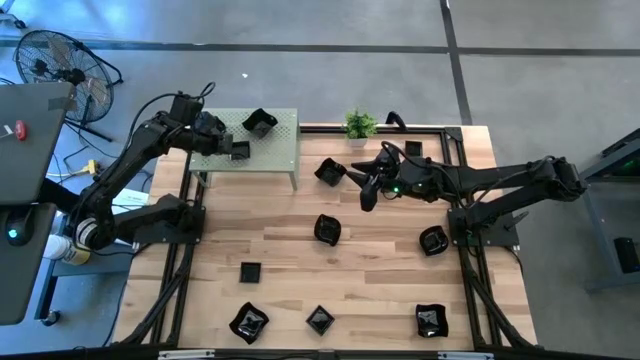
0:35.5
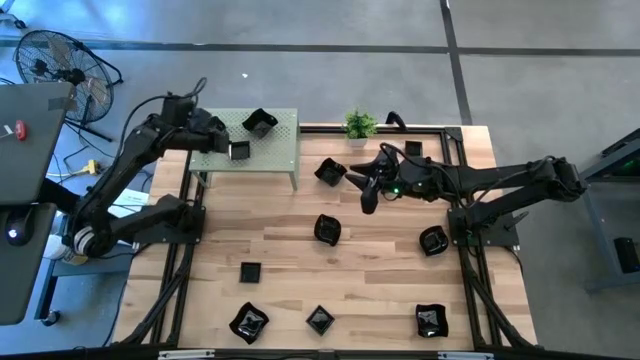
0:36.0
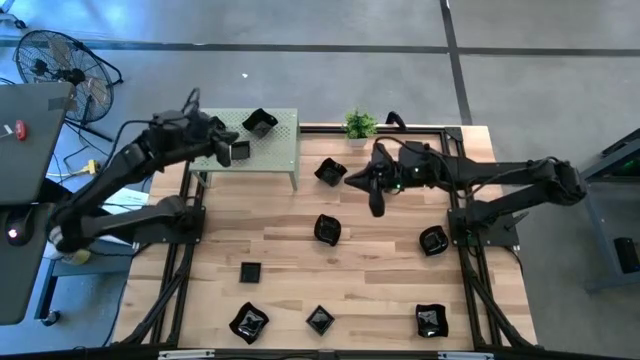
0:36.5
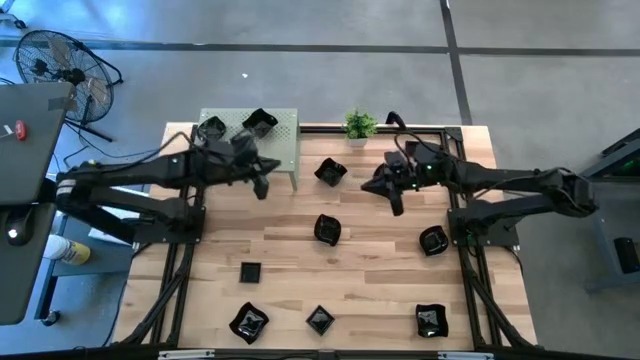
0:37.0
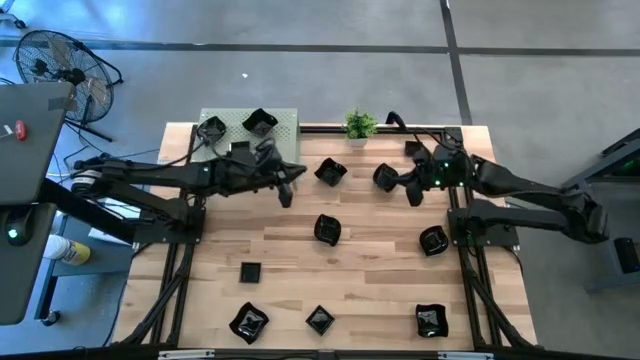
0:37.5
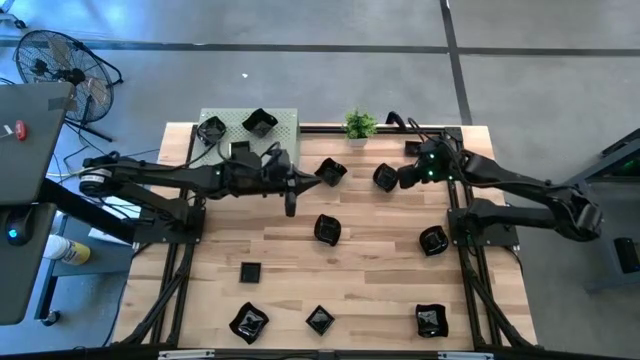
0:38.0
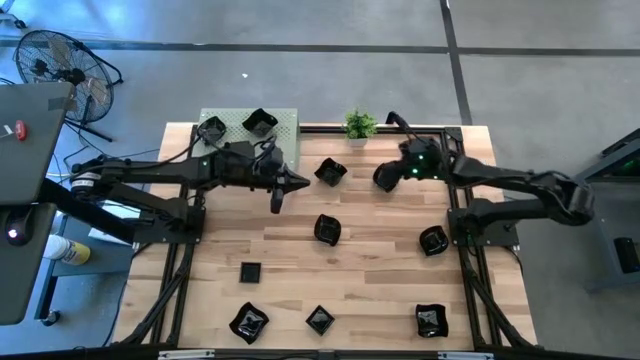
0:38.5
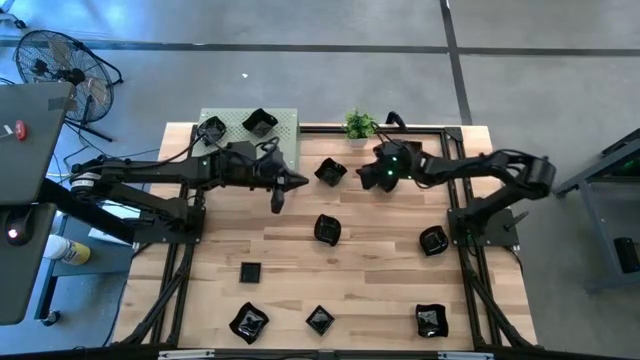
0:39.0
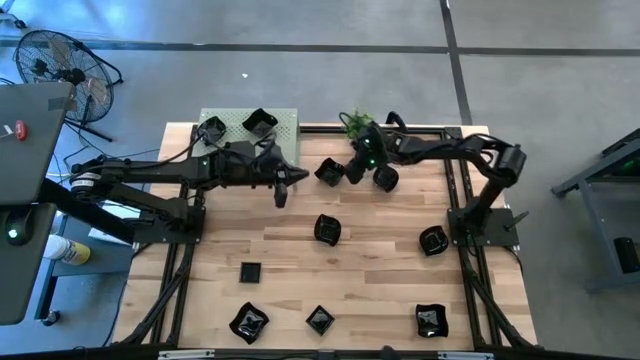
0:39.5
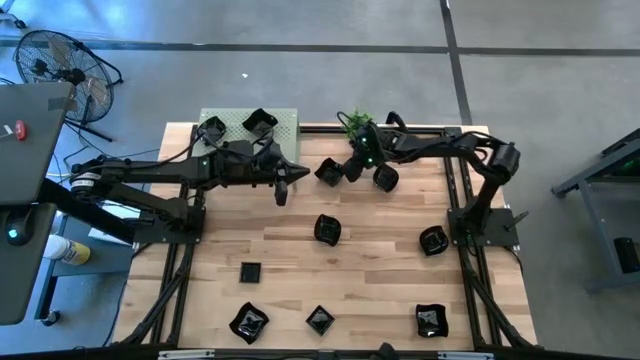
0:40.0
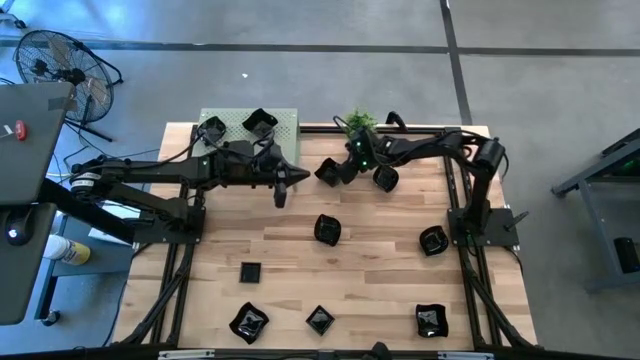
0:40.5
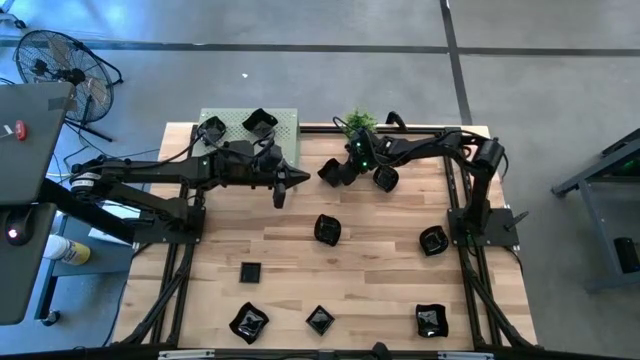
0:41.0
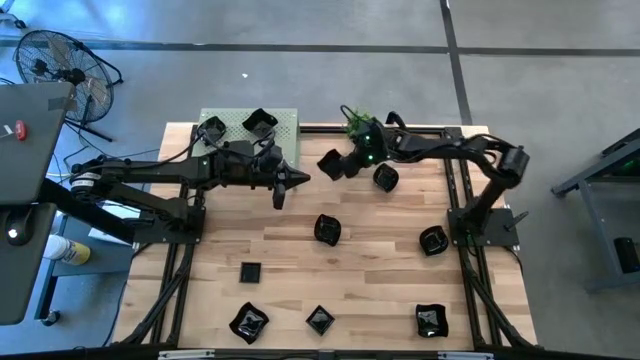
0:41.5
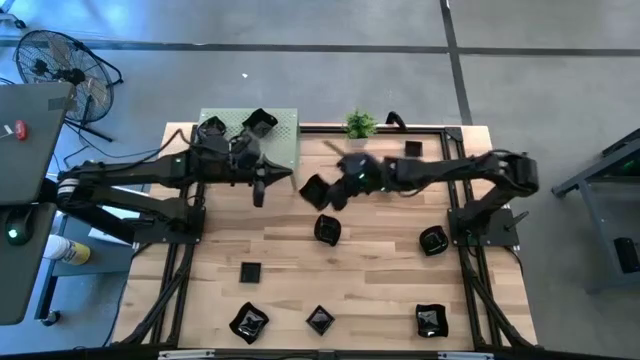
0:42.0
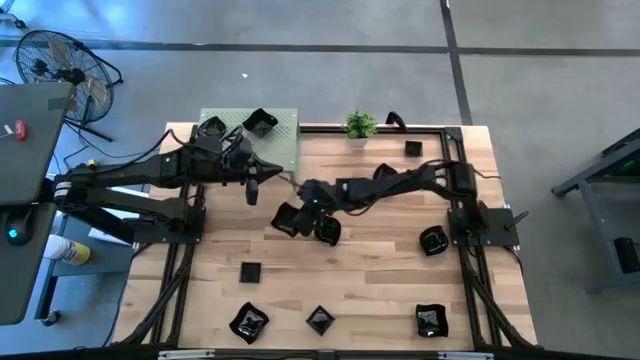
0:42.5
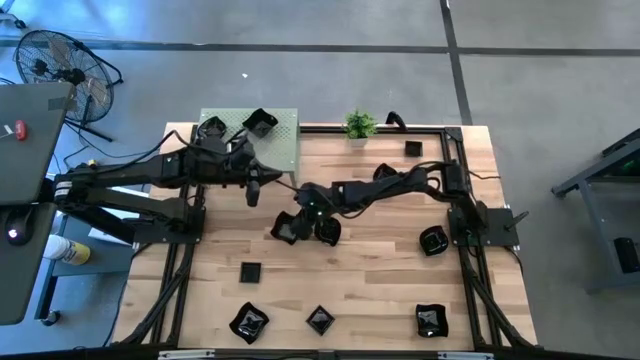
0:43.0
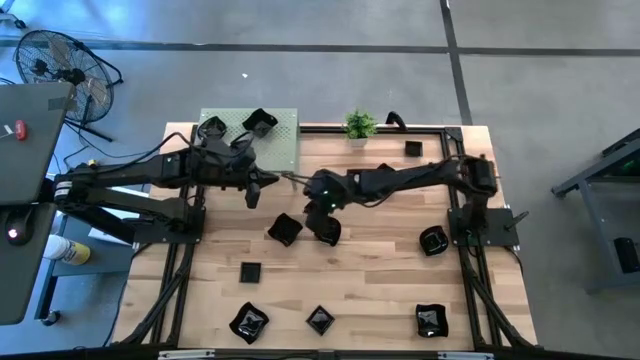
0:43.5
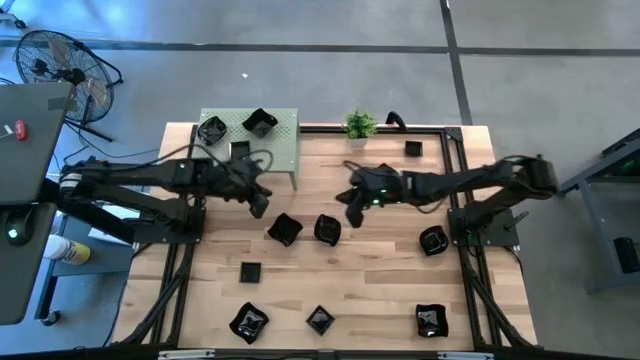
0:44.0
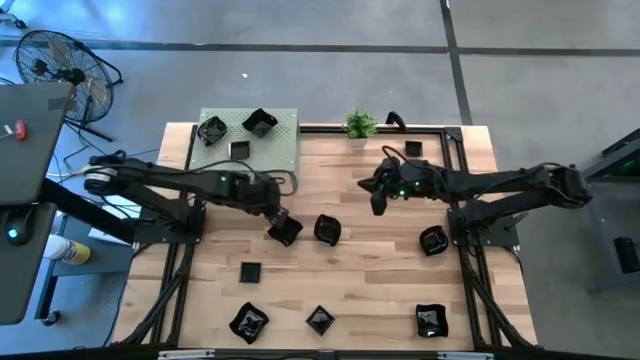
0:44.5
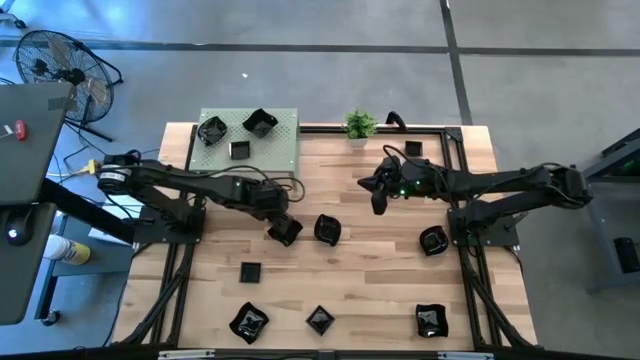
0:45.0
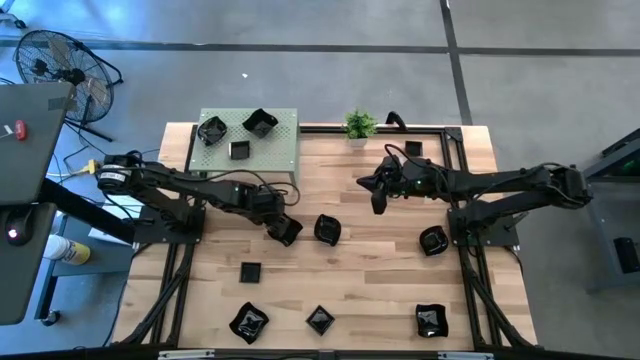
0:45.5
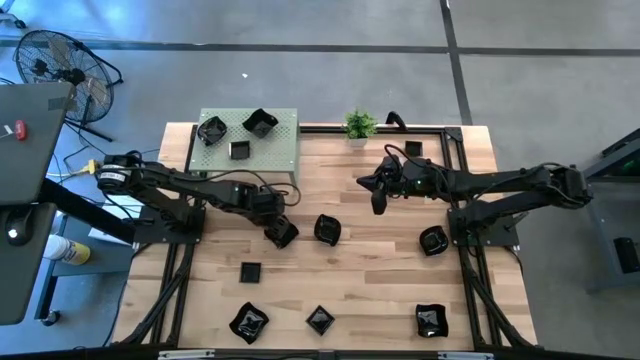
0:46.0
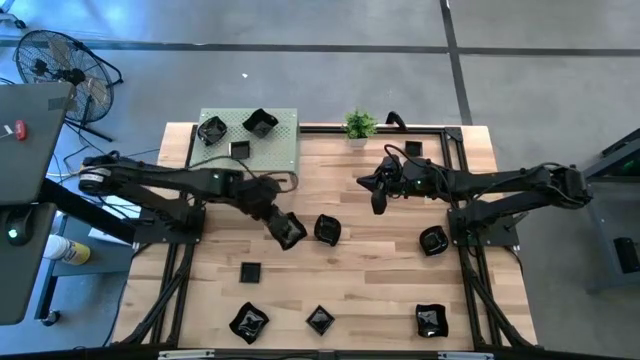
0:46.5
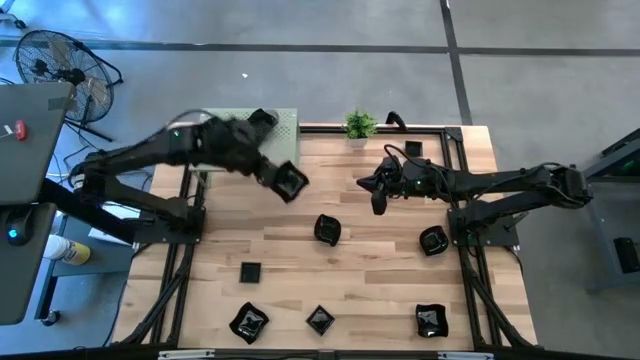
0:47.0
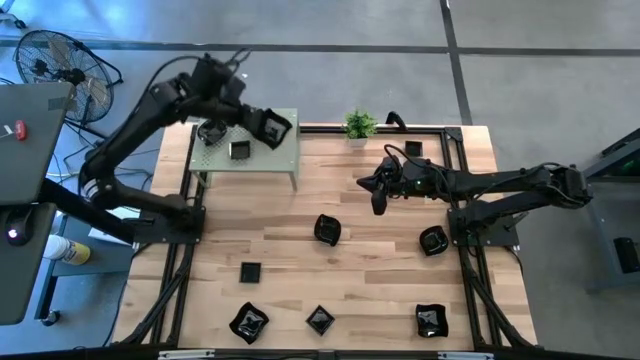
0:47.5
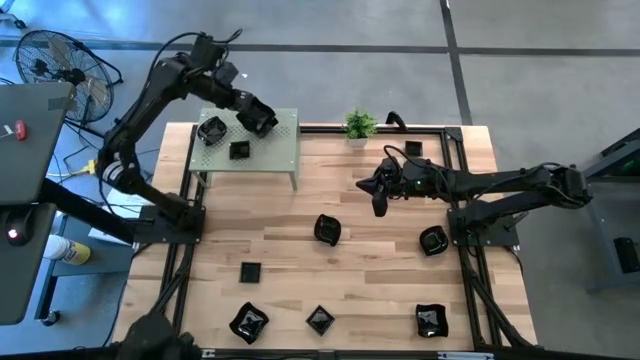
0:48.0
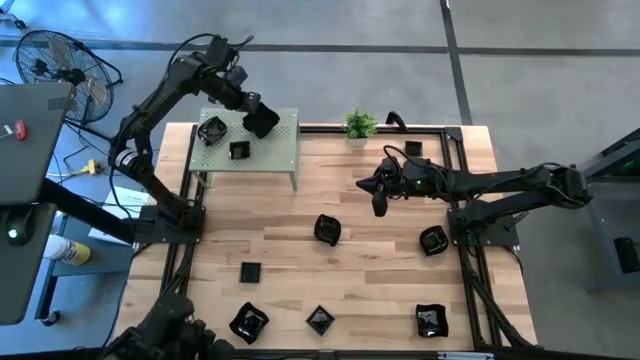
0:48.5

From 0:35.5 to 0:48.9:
Task: Pick & Place Mini shaped plates
Stack the black distorted square plate on top of the black distorted square plate on the shelf

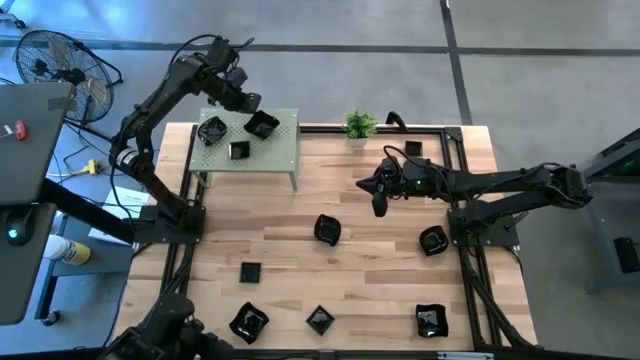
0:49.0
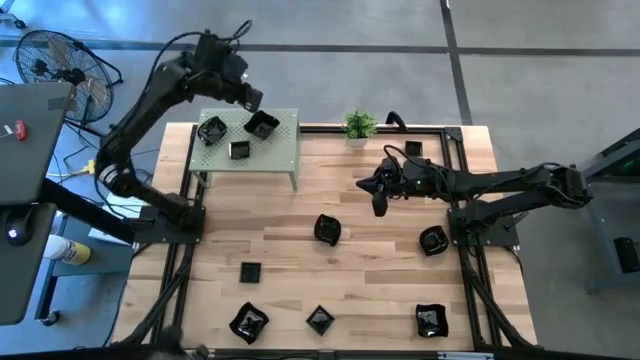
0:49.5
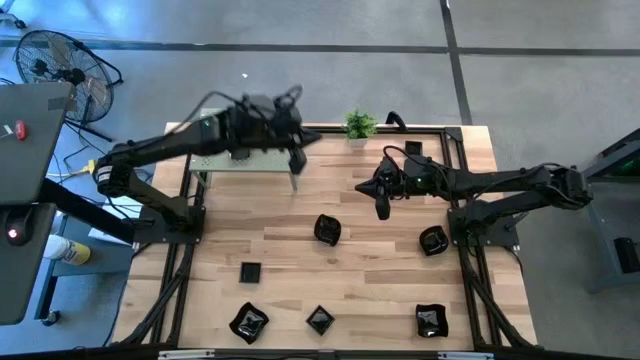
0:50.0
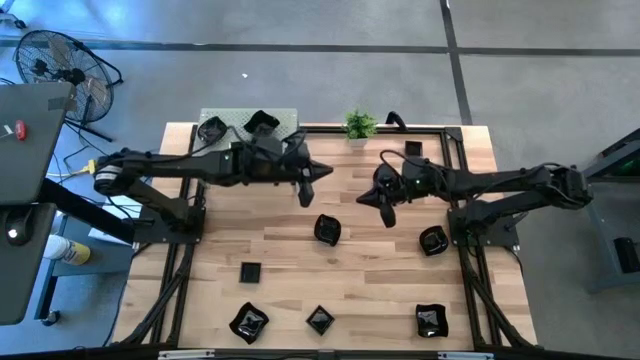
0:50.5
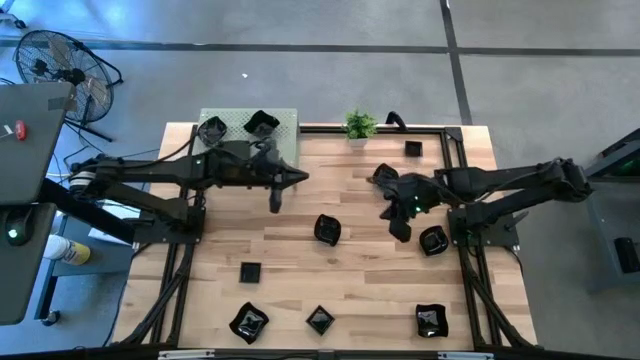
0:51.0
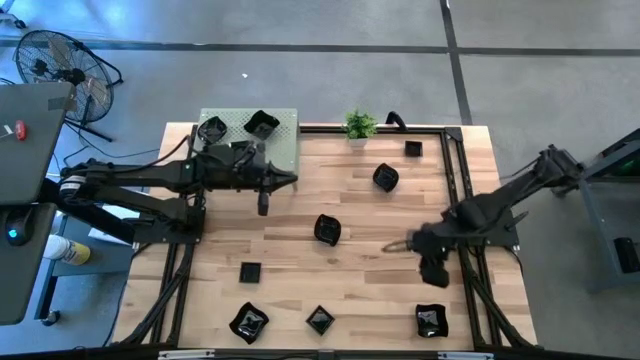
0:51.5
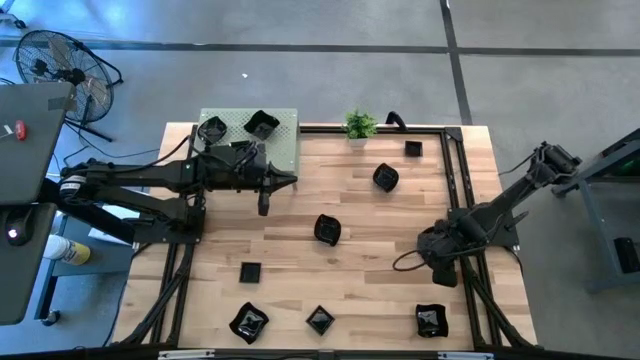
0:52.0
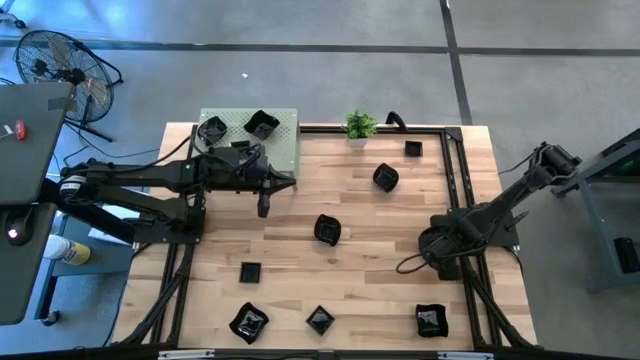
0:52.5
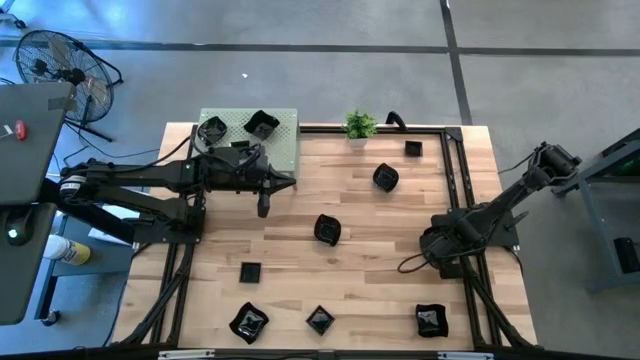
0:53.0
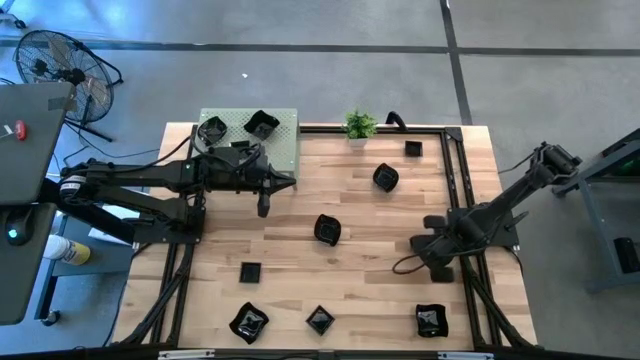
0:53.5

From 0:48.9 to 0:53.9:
Stack the black leaf-shaped plate on top of the black leaf-shaped plate on the shelf

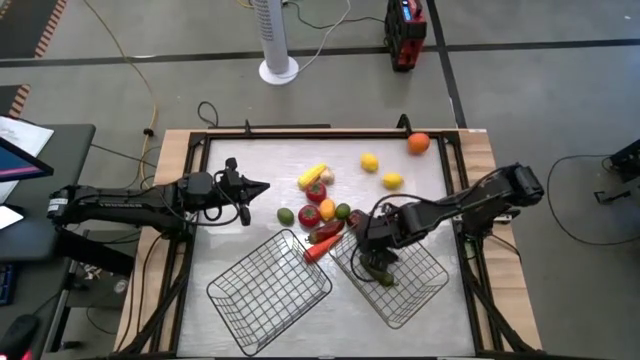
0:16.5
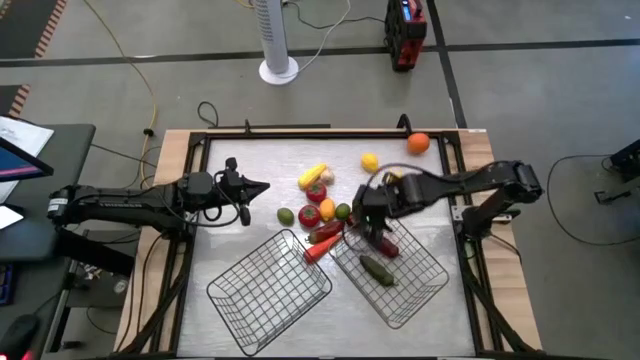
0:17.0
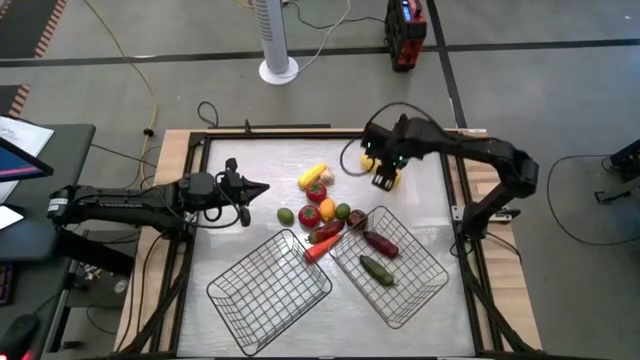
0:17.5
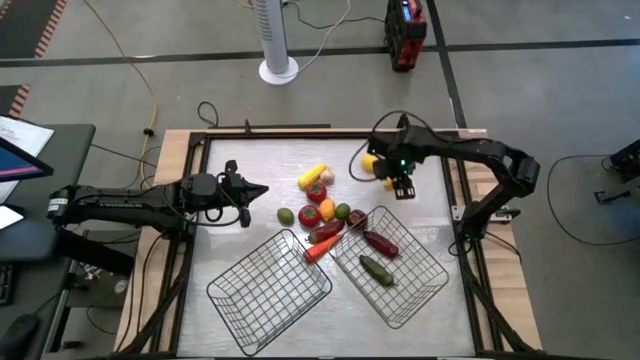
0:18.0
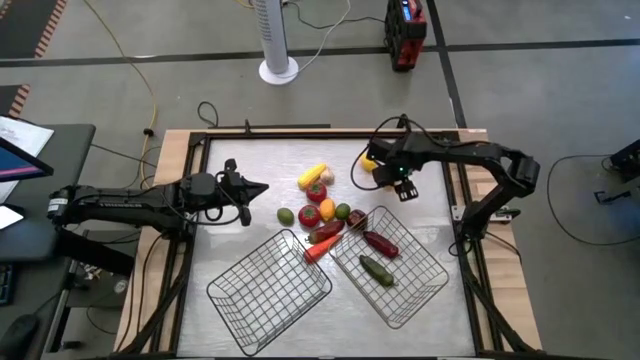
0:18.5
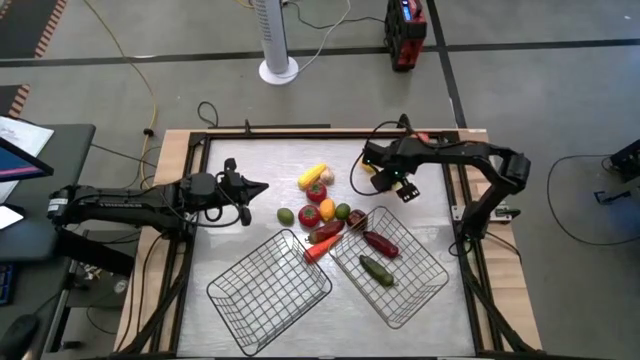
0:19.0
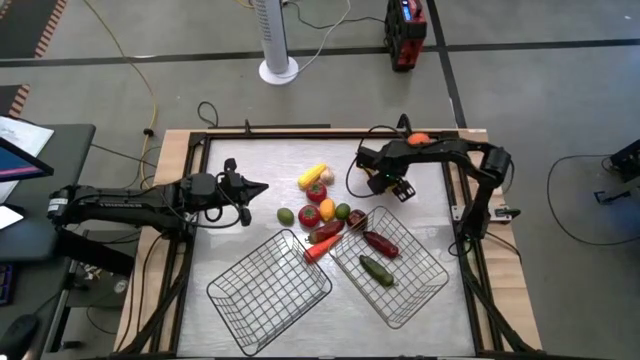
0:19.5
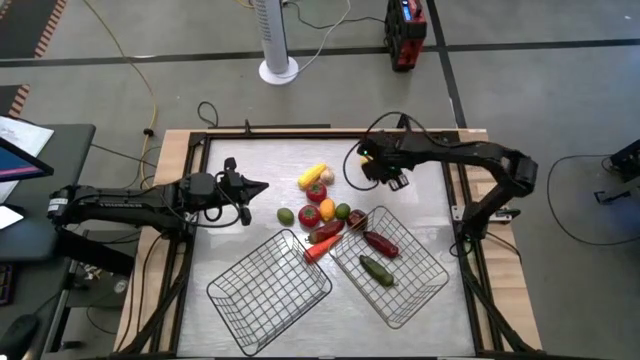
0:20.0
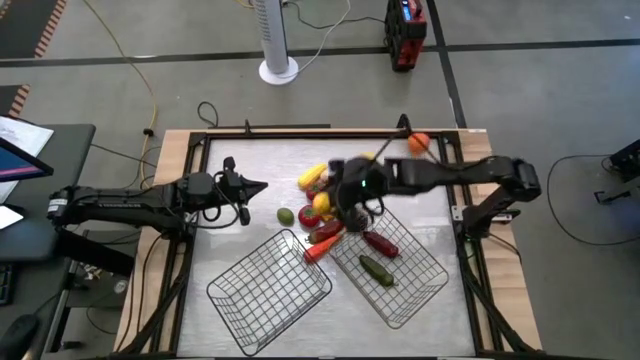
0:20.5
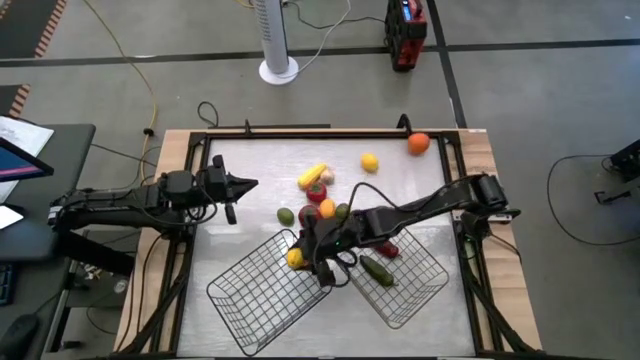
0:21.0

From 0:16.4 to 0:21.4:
Task: Sort produce into baskets
Put the middle right yellow lemon into the black wire basket
